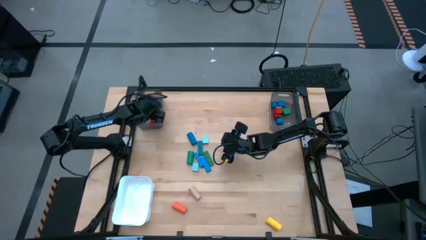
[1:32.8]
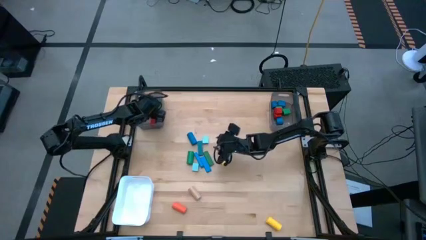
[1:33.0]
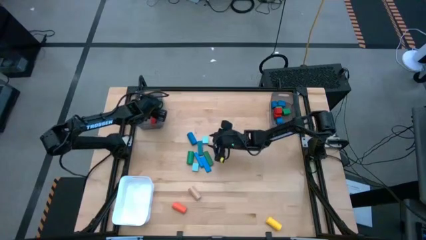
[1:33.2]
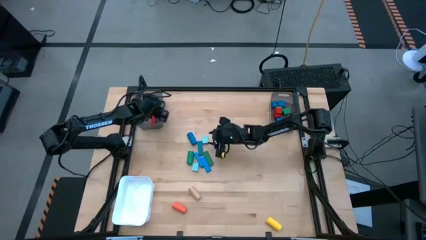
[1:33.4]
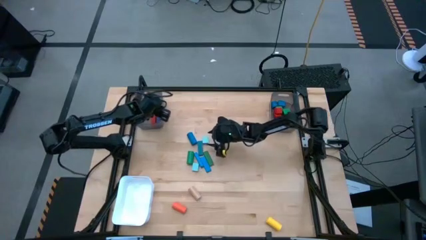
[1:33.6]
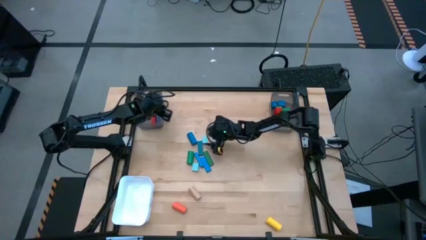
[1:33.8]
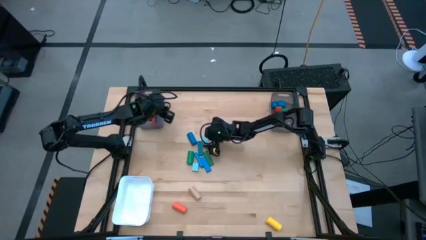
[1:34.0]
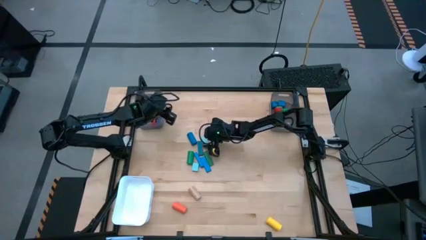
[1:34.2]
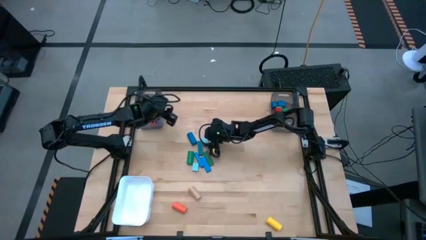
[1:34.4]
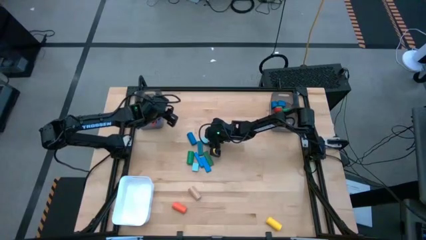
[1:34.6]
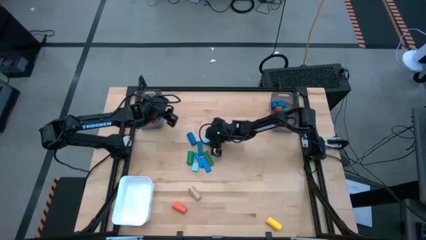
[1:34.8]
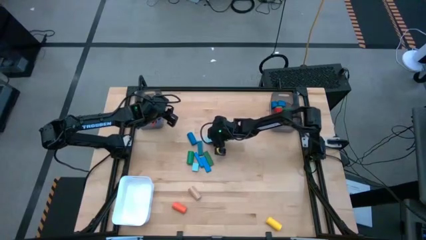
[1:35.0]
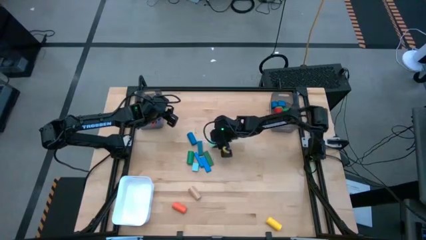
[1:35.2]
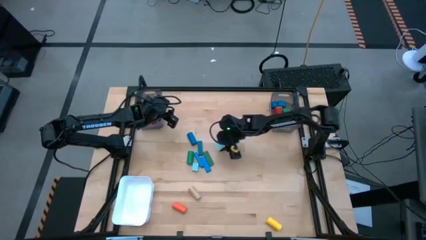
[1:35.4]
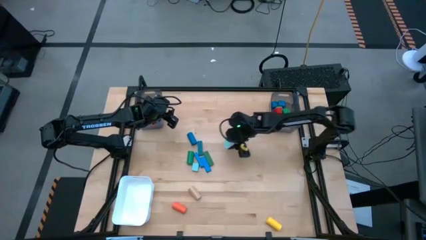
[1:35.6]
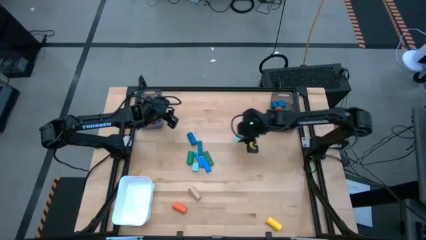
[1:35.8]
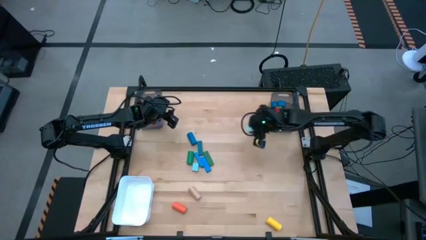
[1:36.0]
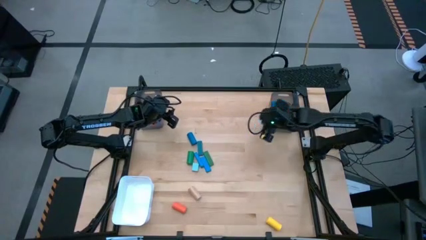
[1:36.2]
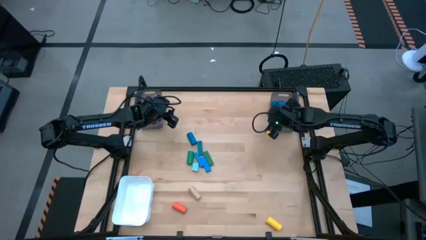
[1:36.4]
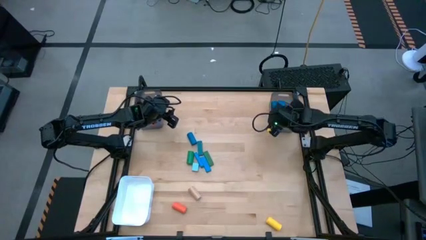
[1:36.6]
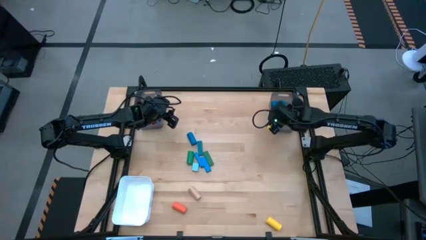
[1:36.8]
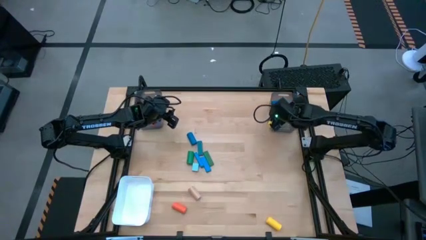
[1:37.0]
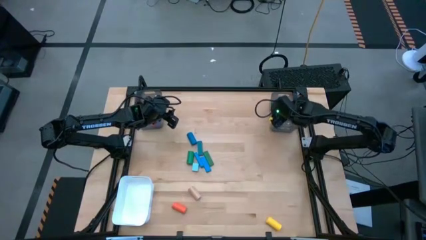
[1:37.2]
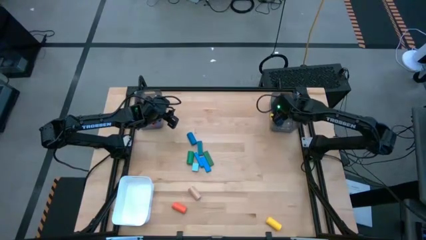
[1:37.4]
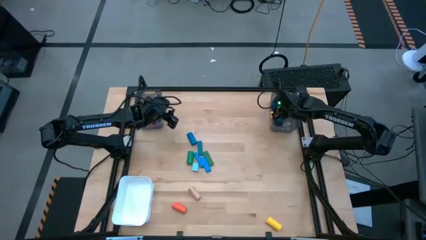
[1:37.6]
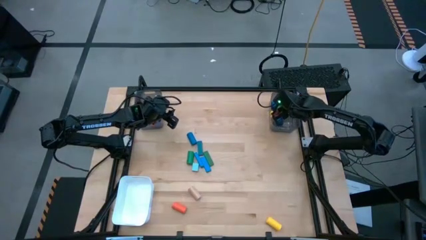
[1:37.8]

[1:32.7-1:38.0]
Task: Sort blocks by size
Put the light blue half circle block into the right black bin

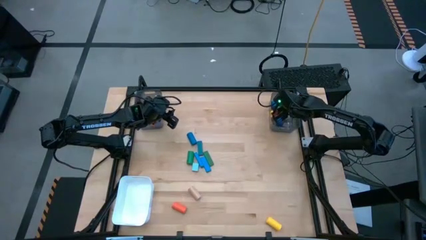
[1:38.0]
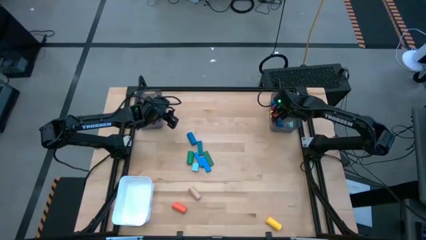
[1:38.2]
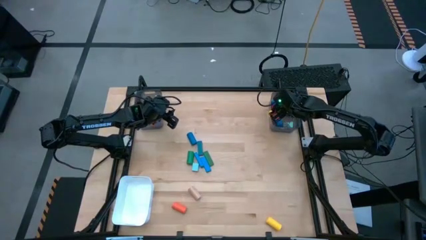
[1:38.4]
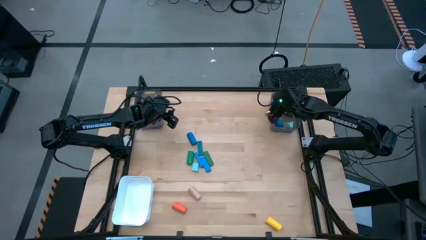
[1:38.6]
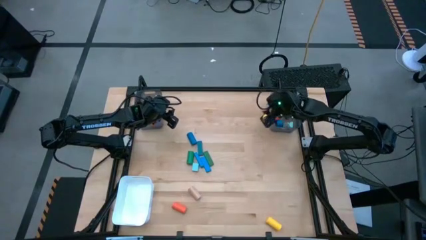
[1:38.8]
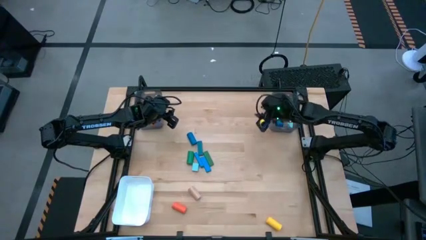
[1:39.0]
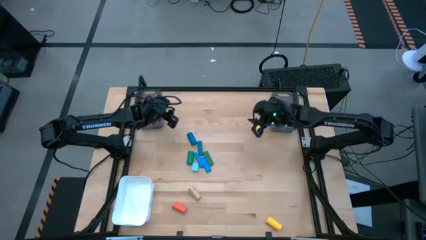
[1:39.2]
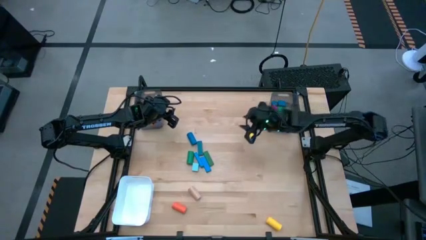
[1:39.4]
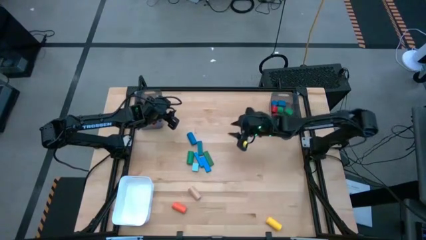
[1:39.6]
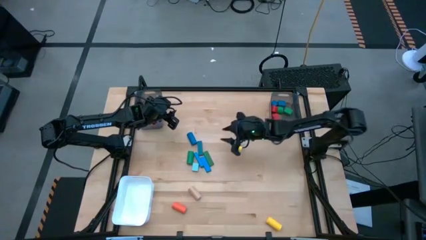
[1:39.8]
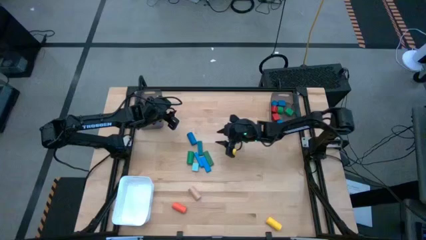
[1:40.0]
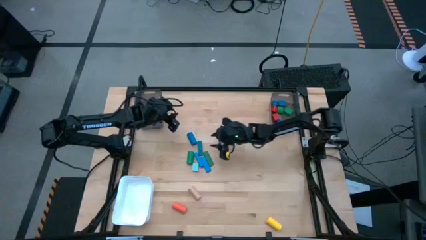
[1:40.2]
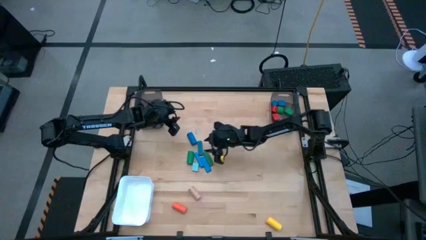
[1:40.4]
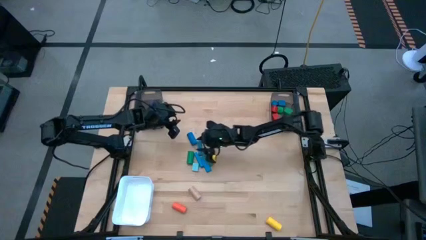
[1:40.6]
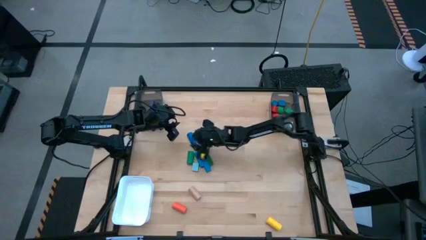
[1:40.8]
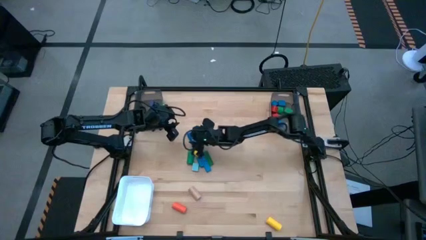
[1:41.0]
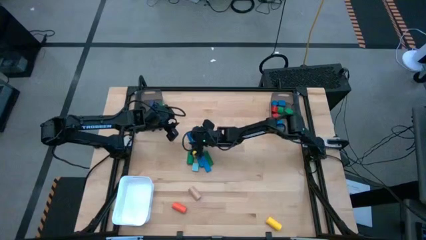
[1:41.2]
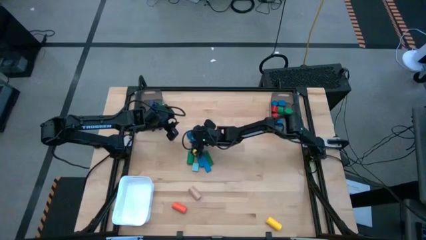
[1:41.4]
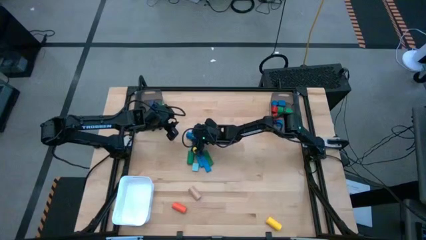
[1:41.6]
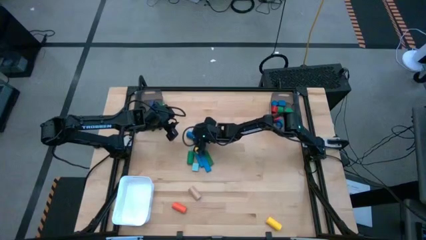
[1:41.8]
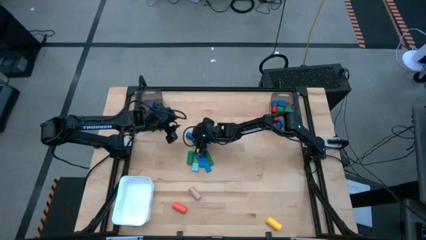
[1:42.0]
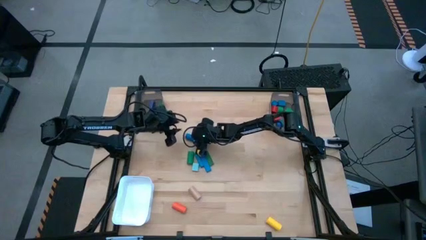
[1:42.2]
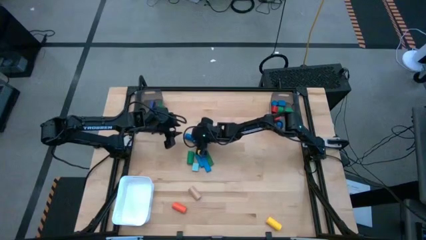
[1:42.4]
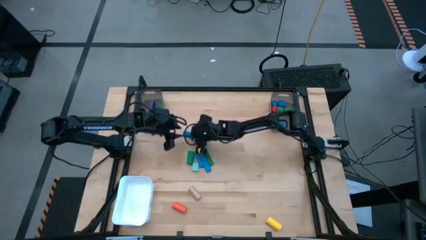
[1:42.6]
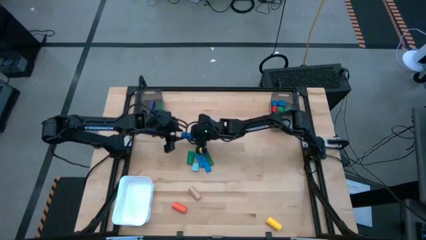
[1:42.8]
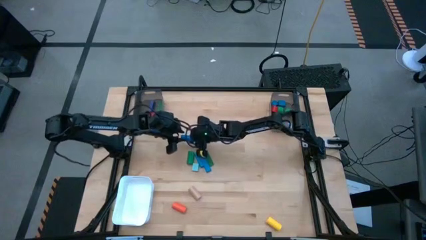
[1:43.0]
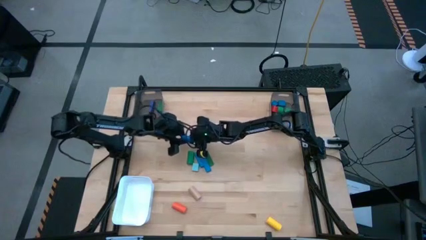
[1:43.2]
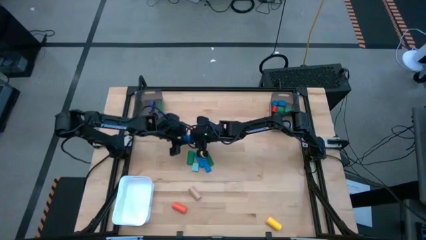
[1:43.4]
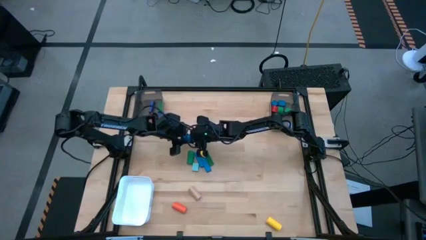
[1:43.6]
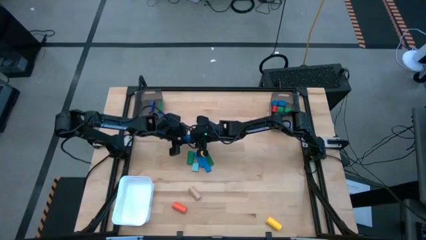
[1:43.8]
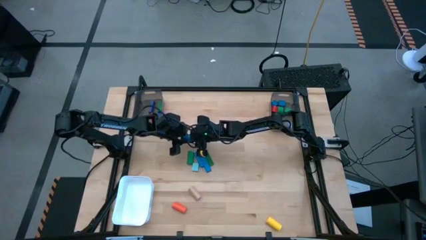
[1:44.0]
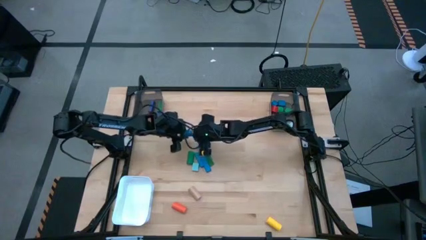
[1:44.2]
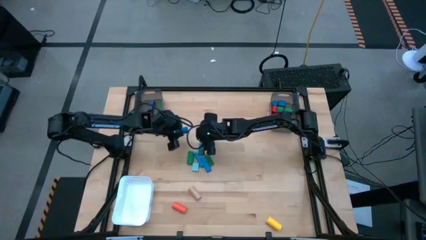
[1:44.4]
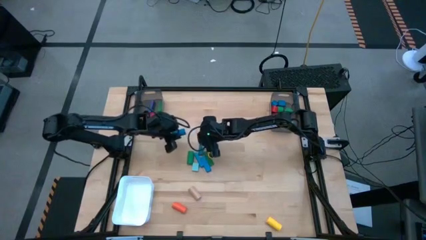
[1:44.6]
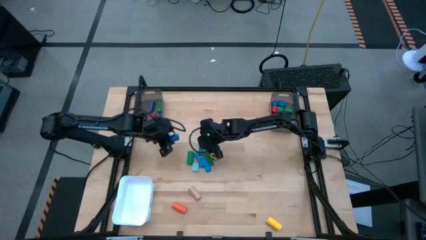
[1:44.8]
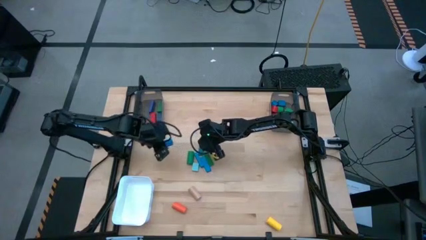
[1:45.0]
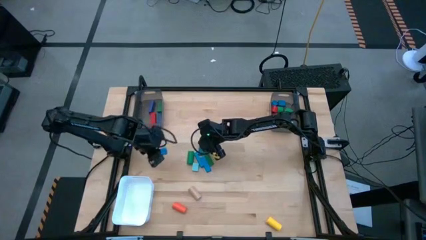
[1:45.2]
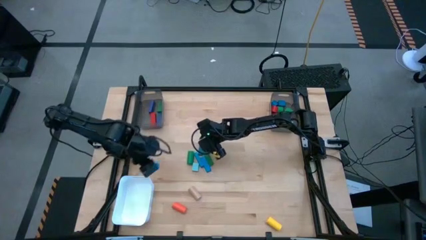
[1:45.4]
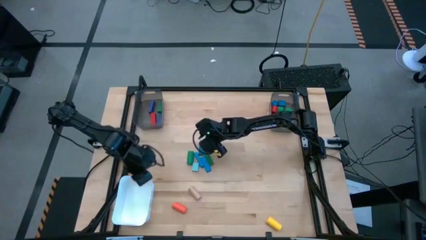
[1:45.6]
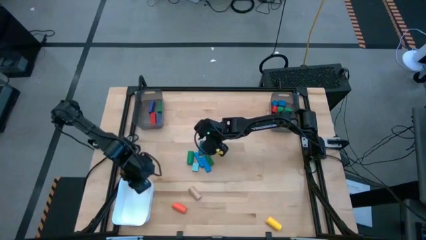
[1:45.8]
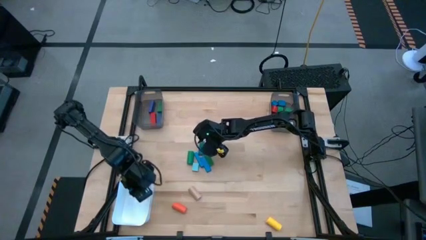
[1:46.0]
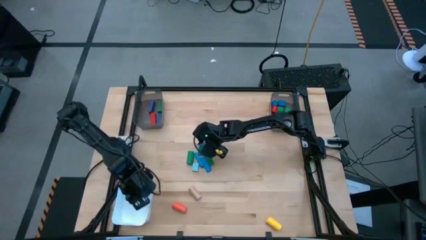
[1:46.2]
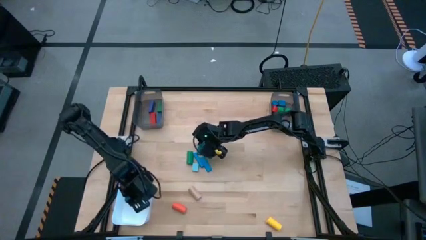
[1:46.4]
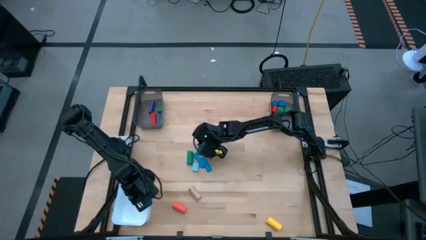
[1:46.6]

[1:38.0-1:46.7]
Put the blue cylindrical block into the white bin

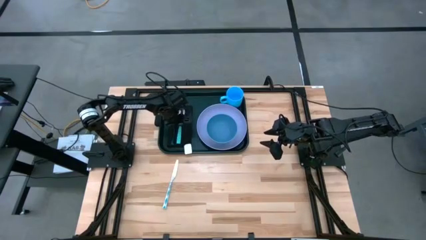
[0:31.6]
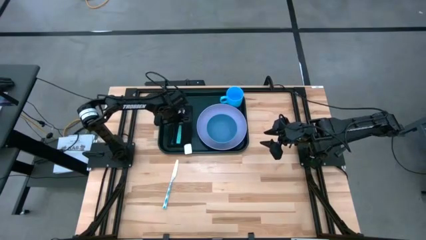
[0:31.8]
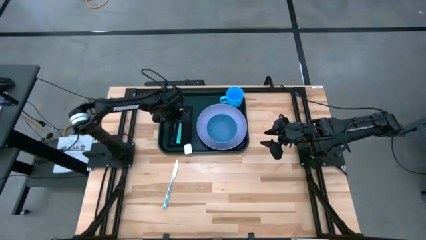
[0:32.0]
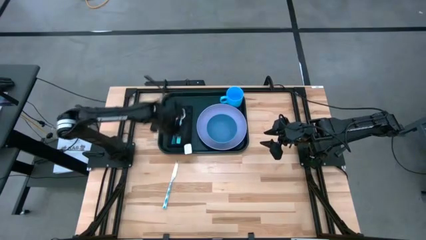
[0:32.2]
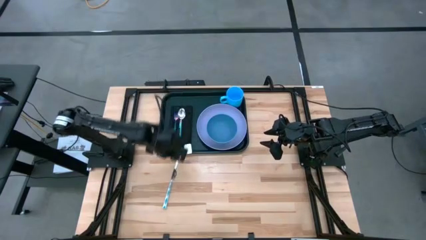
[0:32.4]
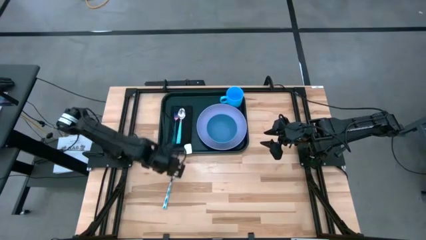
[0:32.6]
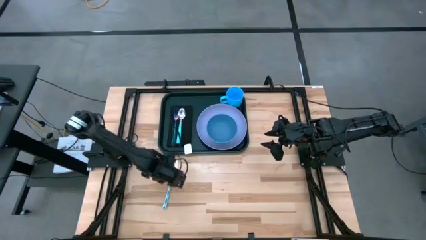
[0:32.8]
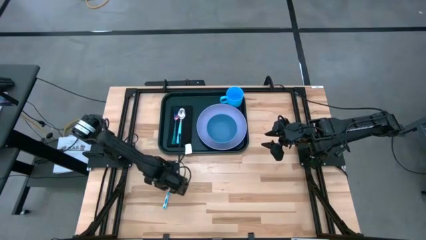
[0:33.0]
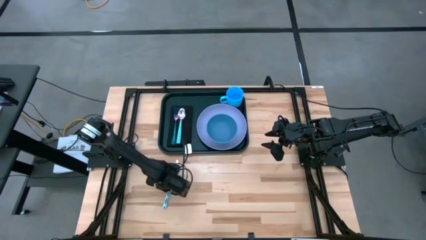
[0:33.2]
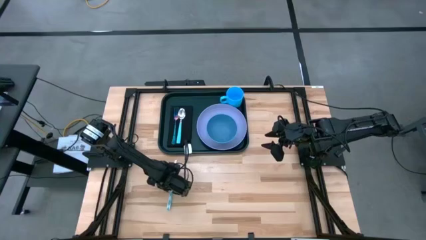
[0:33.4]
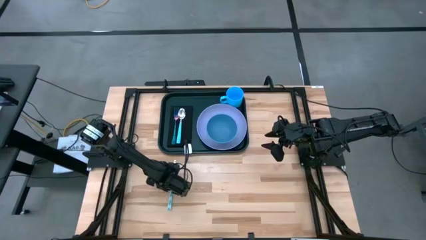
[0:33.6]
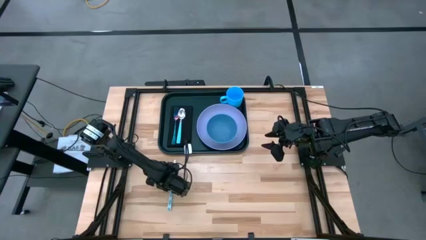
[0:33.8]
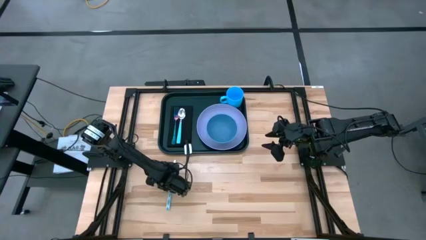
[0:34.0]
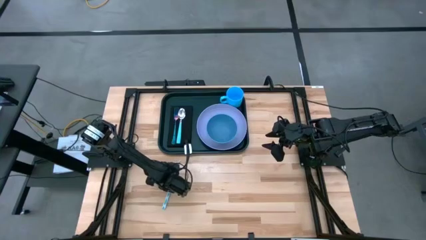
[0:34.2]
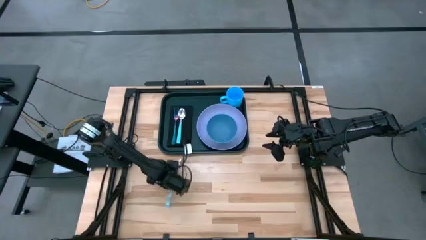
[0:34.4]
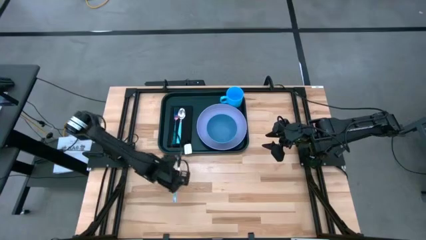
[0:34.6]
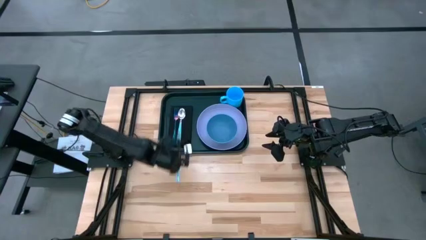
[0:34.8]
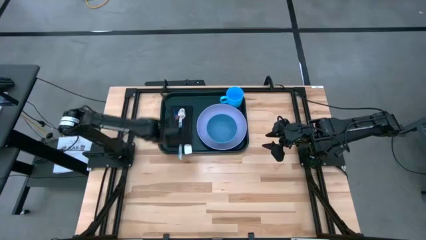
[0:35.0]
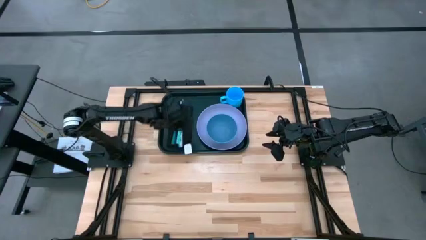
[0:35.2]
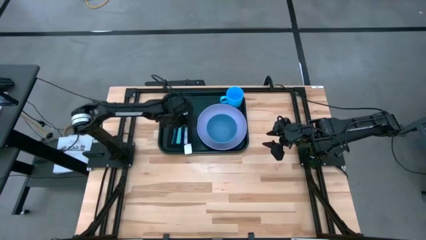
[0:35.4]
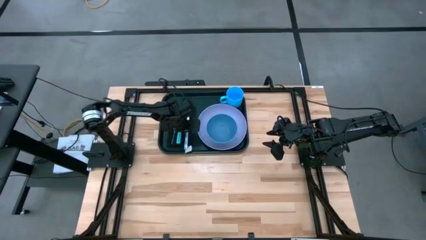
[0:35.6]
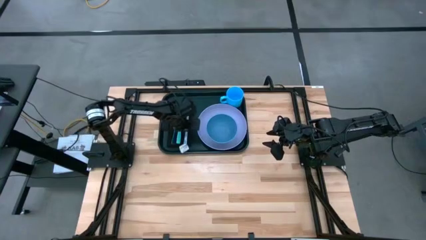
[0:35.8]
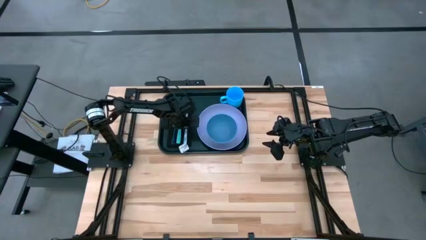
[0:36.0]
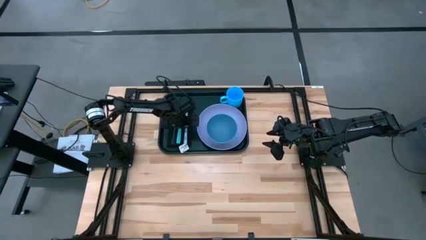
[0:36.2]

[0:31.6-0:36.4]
Task: Set up tray
Put the blue knife on top of the black napkin to the right of the blue spoon
